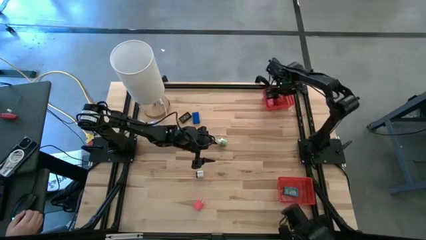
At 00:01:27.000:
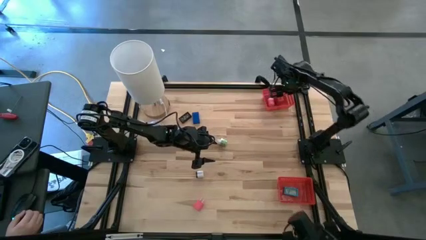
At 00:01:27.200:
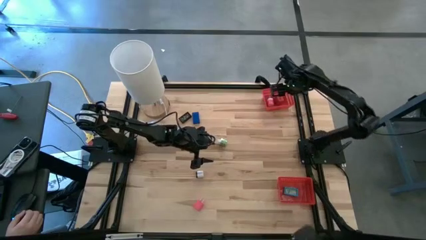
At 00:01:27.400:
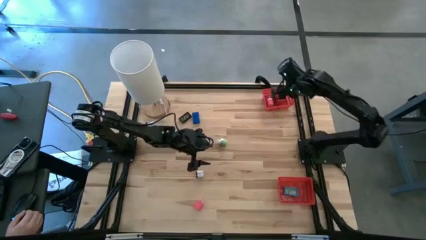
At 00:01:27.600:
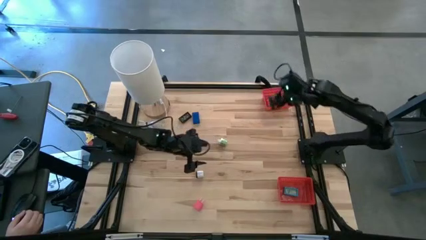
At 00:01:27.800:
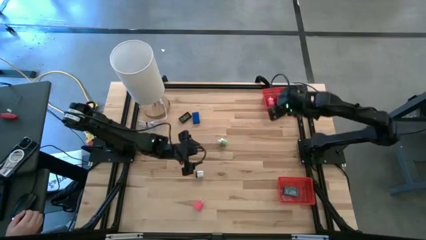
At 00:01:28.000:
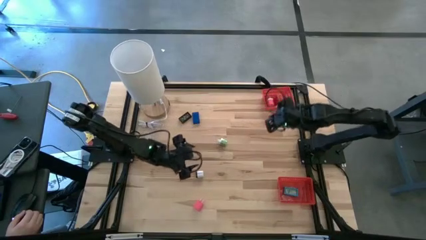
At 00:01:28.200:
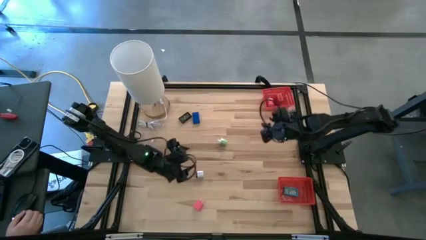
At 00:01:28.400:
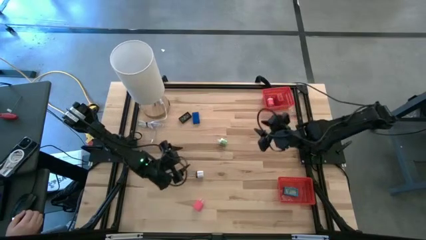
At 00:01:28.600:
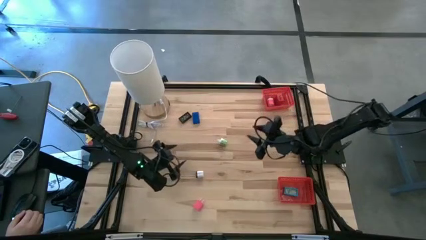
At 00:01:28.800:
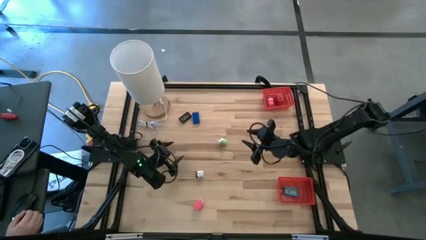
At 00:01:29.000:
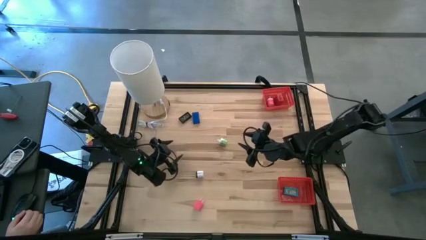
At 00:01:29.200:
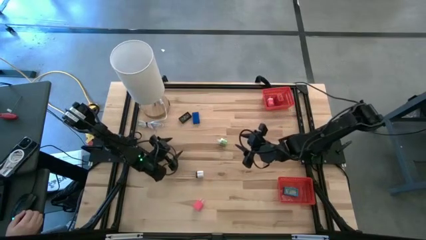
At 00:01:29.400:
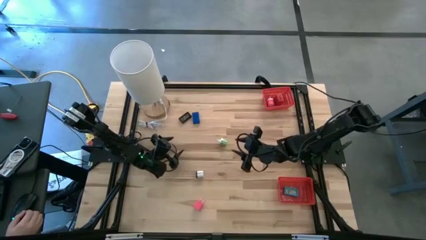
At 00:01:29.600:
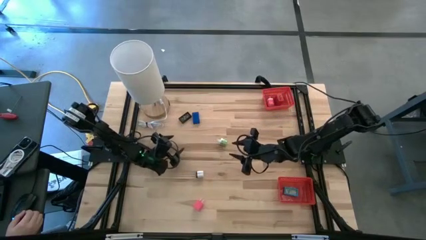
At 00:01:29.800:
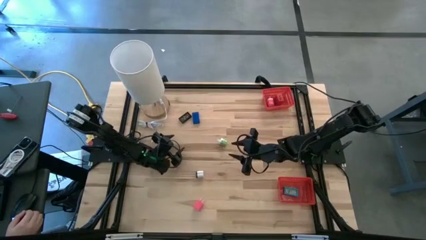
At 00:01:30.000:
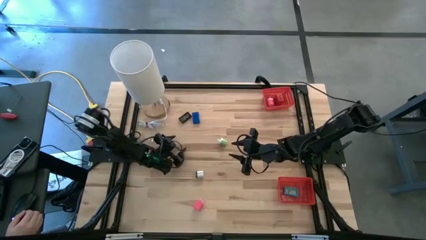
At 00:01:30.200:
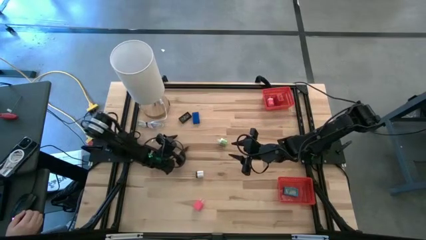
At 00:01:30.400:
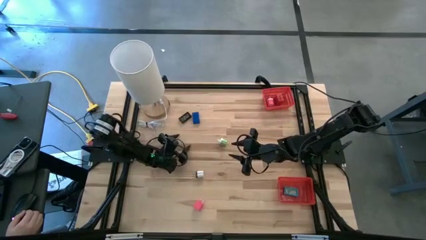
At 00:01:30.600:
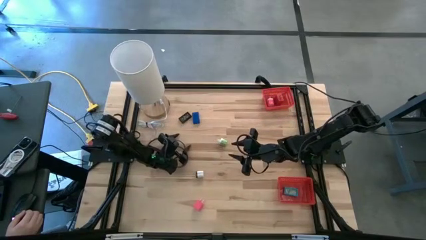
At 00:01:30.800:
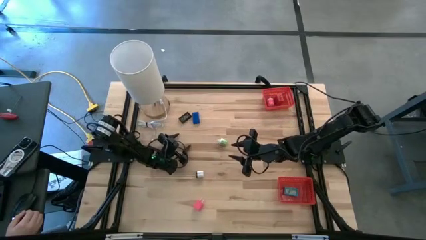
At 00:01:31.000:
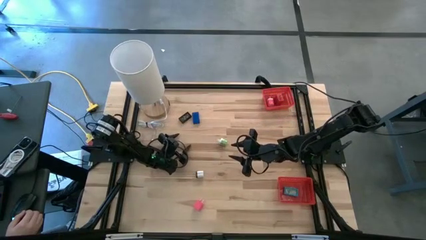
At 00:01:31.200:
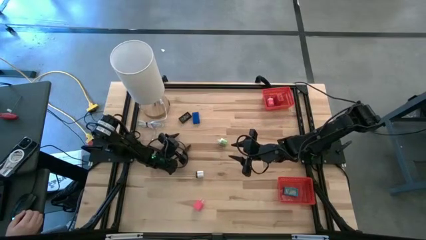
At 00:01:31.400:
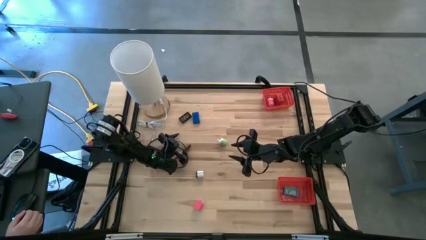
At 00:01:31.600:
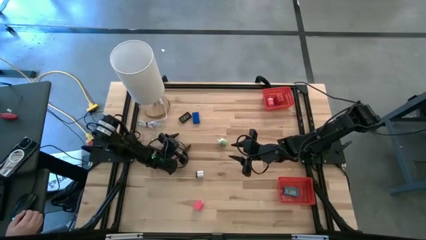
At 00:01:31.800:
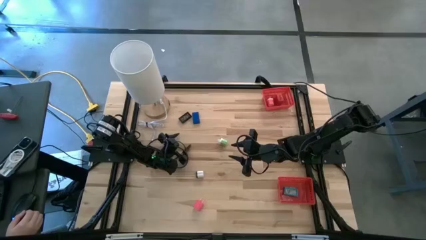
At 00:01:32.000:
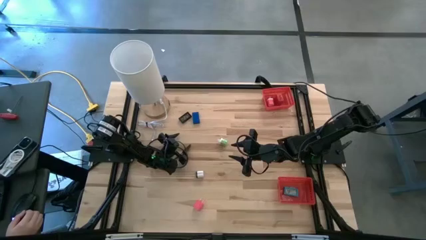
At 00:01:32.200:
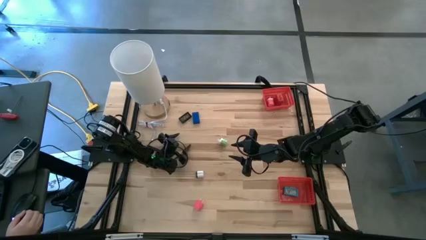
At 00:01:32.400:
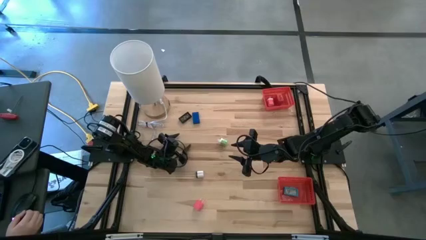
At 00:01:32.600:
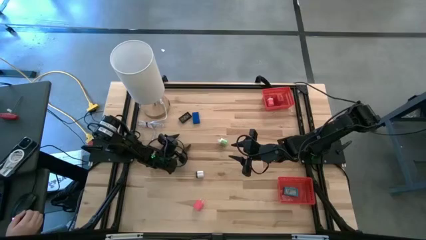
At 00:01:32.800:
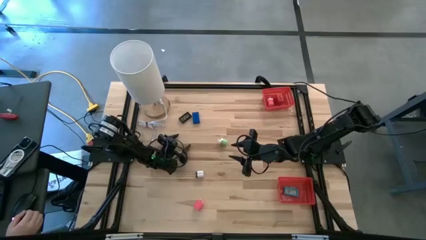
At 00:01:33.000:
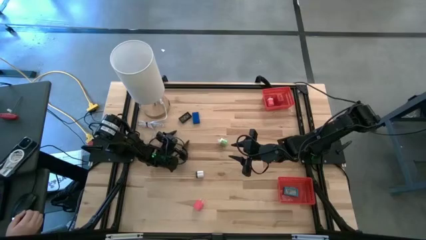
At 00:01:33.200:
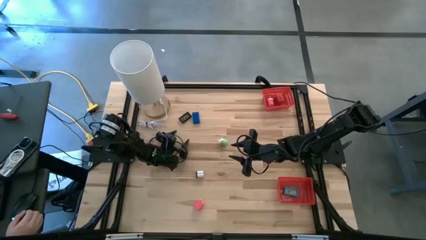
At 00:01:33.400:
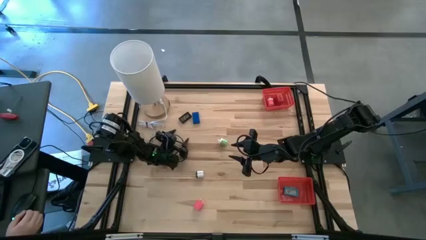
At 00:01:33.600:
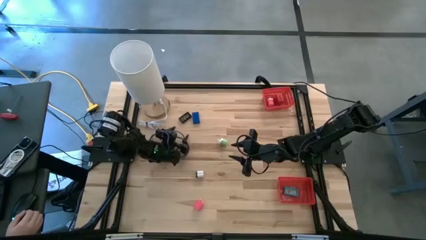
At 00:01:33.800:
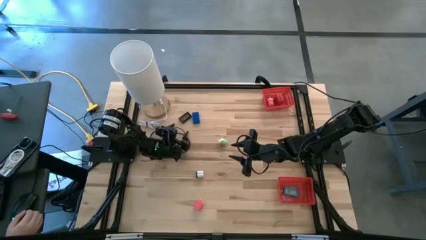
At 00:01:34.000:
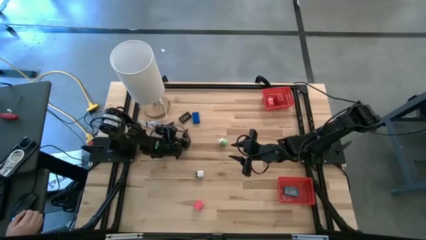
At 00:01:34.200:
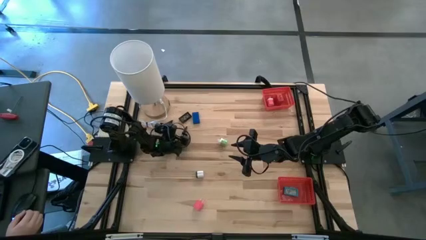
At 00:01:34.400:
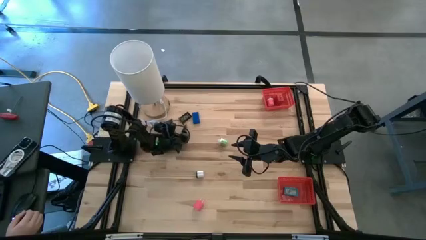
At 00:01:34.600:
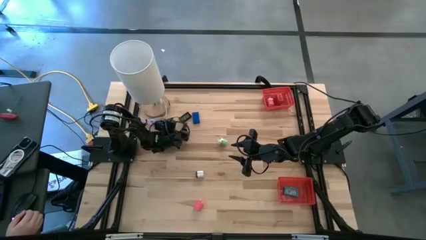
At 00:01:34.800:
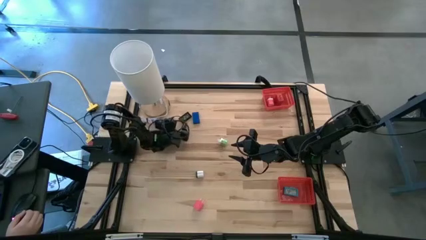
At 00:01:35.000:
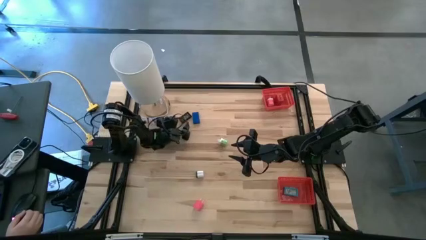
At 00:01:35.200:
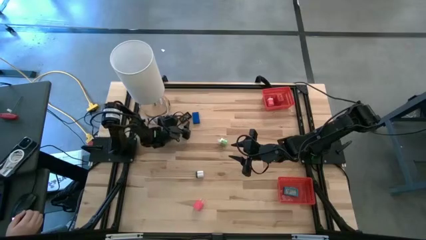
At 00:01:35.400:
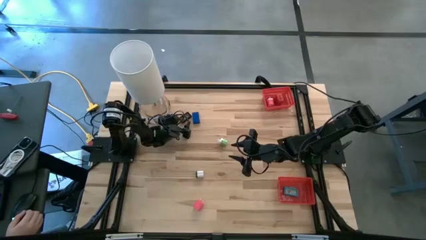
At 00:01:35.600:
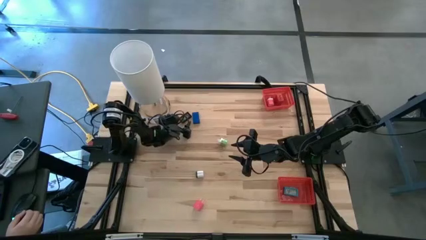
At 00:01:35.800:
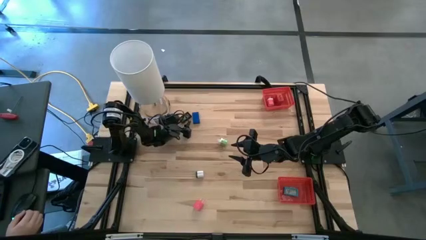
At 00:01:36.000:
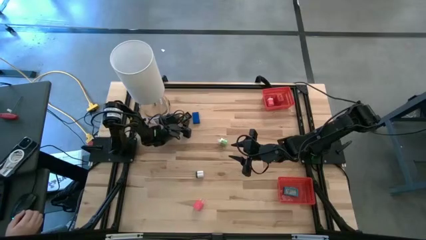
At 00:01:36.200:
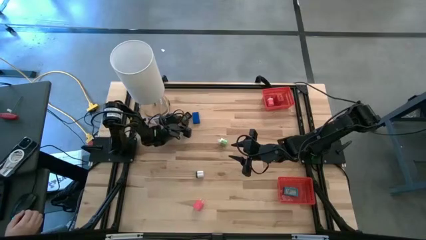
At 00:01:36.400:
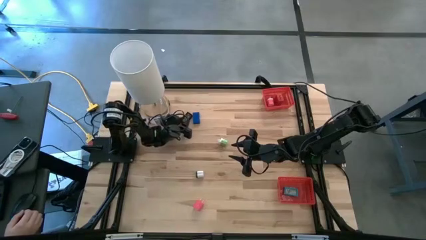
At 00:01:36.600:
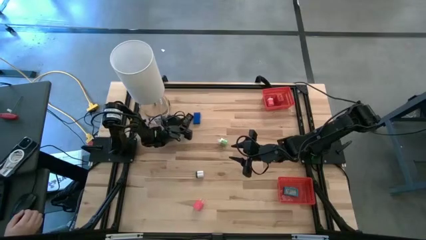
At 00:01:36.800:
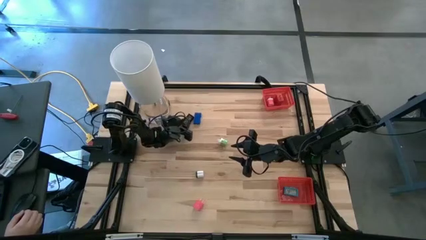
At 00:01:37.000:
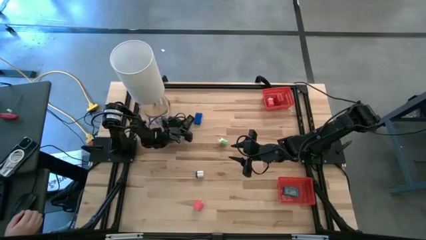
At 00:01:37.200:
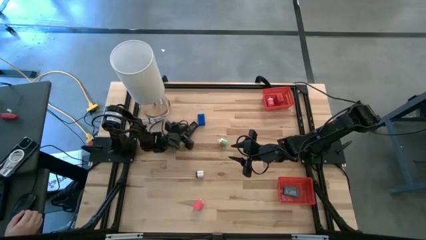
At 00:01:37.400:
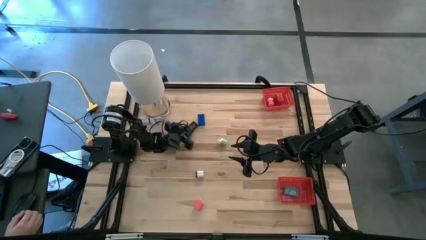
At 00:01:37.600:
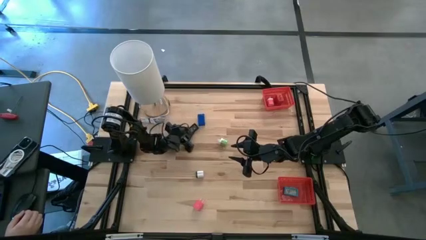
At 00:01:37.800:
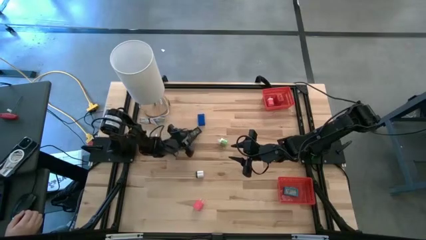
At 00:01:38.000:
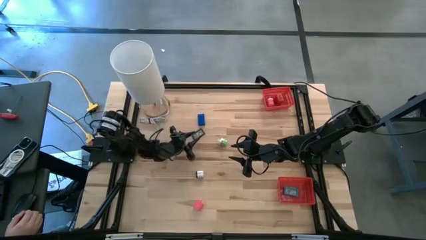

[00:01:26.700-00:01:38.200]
Task: Pick & Place Office items
Put the black digital clock into the bottom red basket
